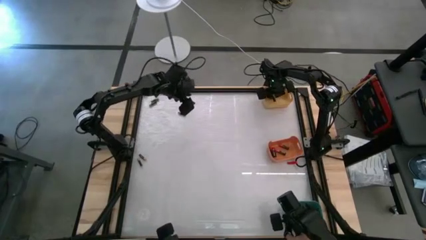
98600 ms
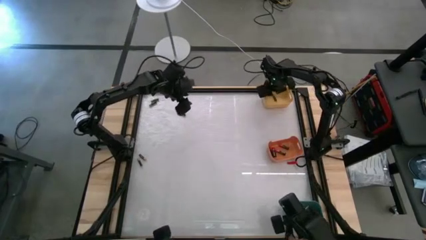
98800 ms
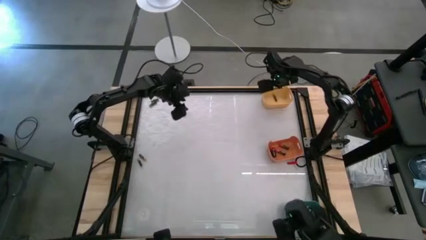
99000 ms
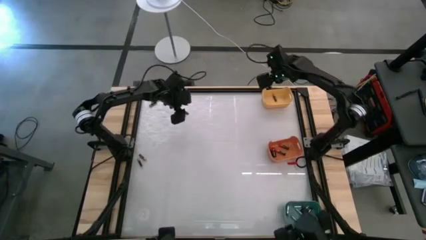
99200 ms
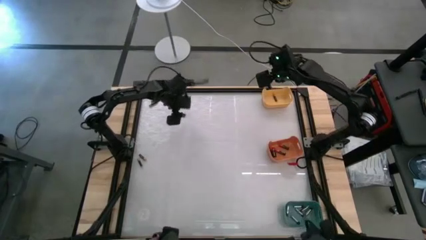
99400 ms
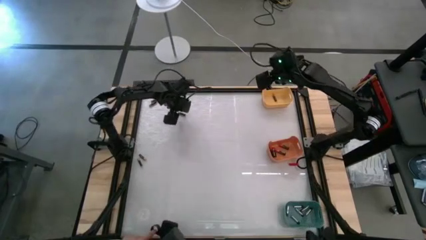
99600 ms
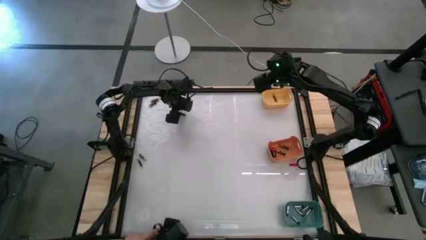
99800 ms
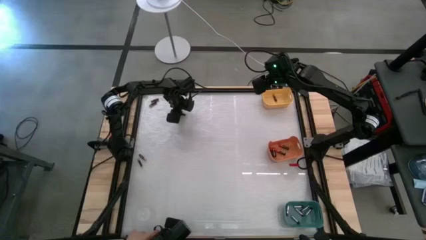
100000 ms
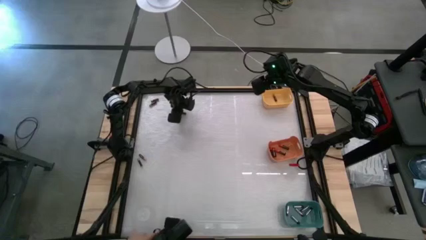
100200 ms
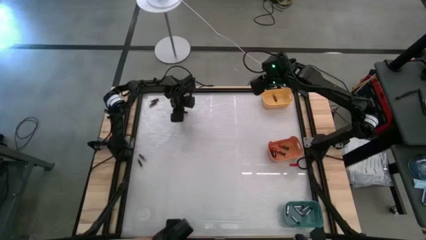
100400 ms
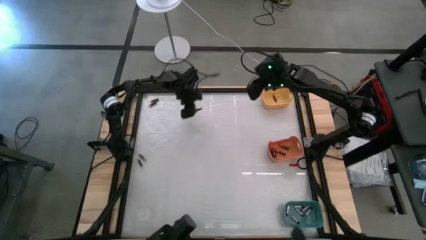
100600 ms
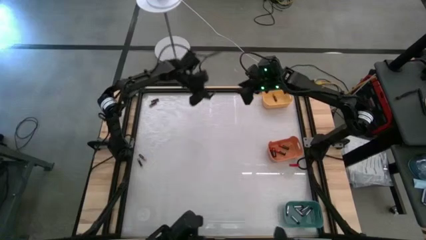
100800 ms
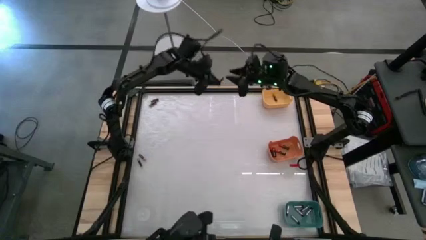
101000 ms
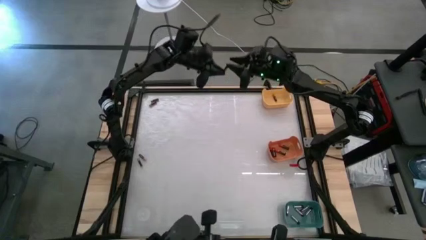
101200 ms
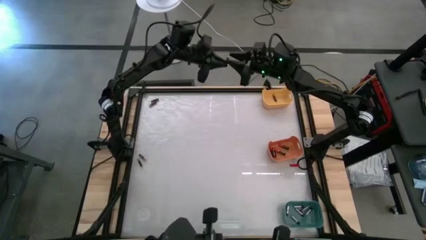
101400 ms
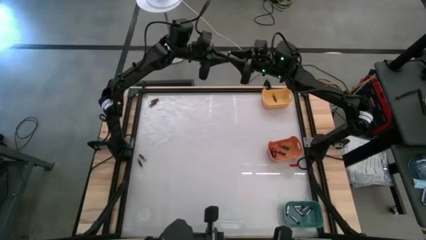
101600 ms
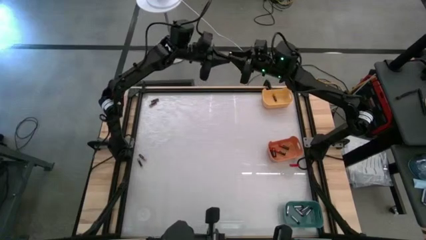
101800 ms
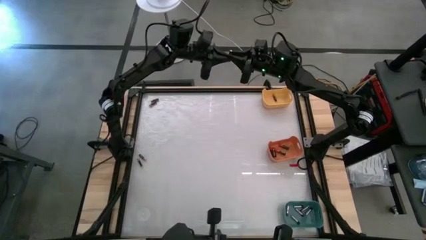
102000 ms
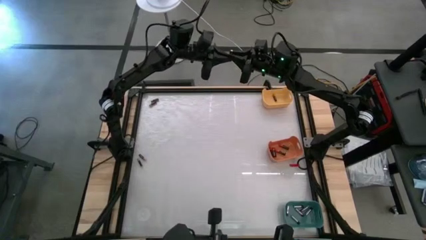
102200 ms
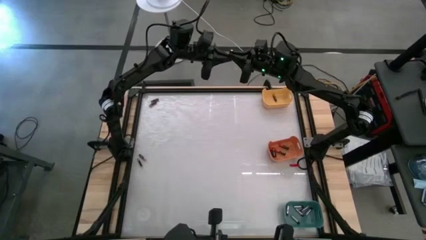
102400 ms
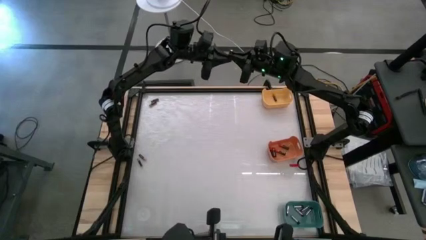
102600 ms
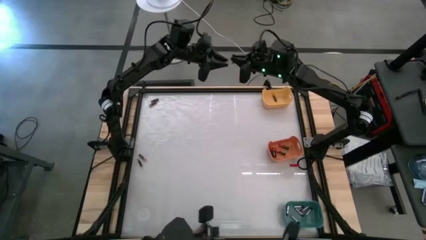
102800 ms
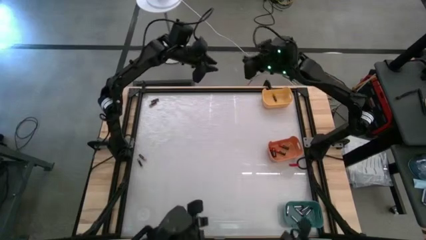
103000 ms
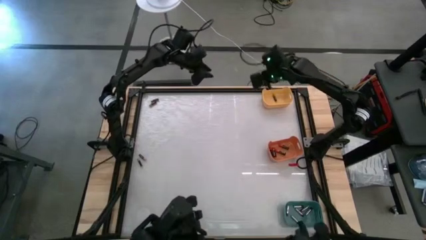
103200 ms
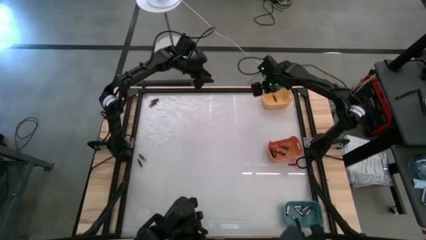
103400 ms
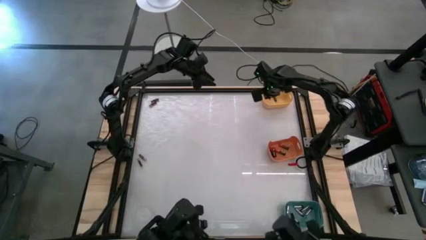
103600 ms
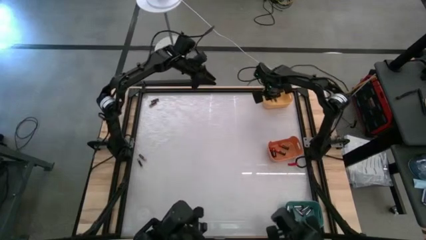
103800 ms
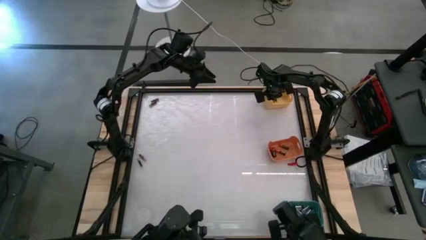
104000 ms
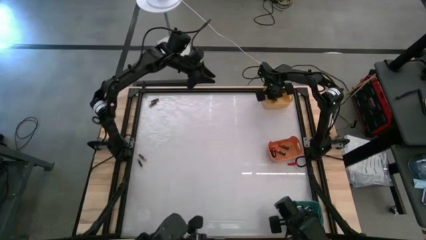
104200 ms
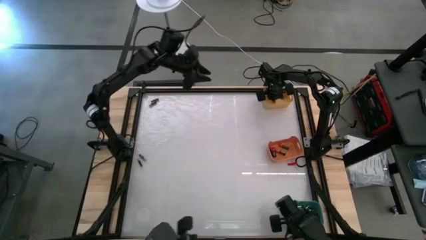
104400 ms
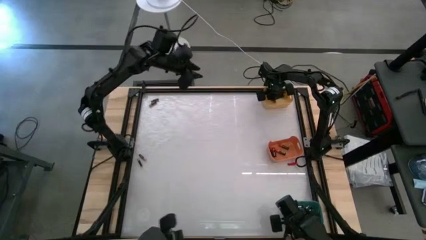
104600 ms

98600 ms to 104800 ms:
Task: Sort batteries
Put the black-orange battery into the yellow bin

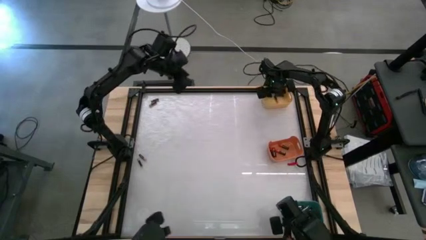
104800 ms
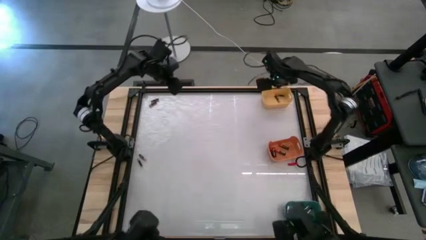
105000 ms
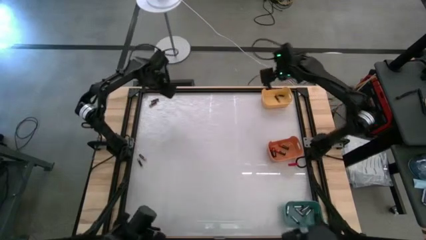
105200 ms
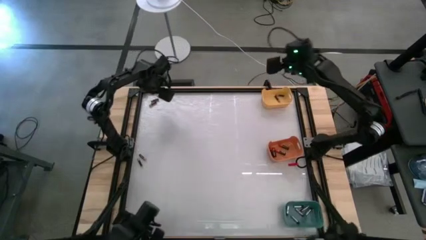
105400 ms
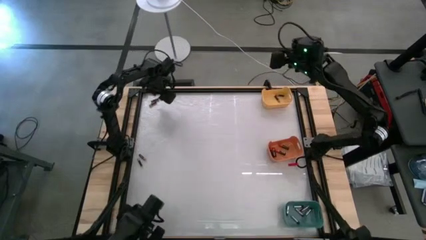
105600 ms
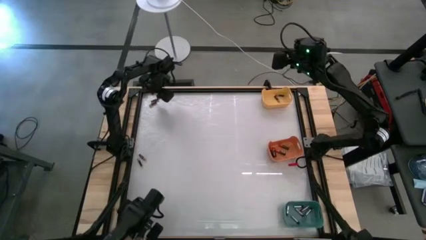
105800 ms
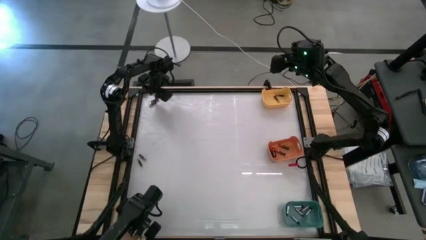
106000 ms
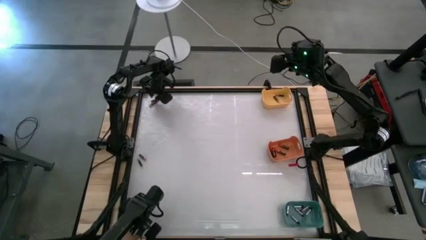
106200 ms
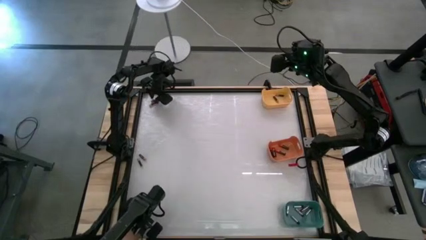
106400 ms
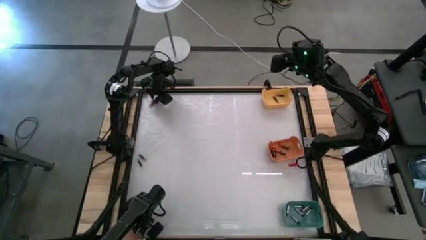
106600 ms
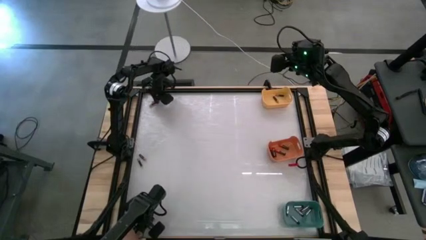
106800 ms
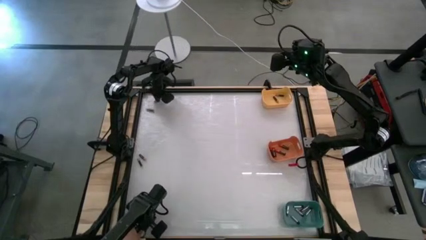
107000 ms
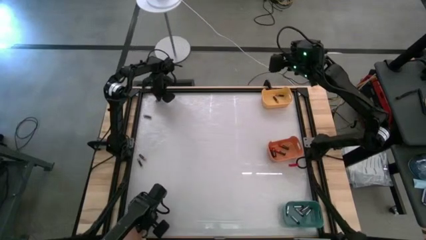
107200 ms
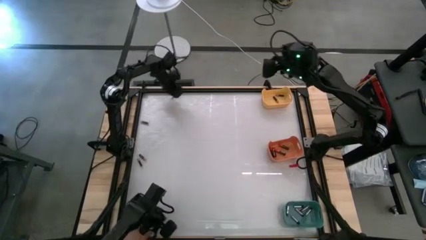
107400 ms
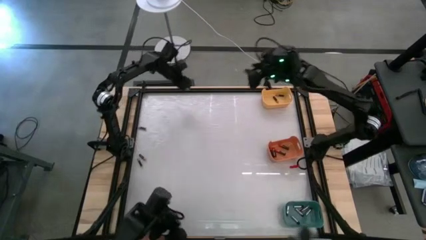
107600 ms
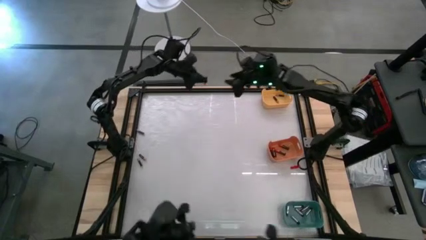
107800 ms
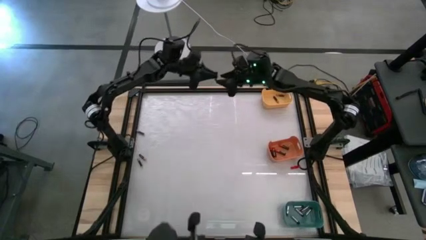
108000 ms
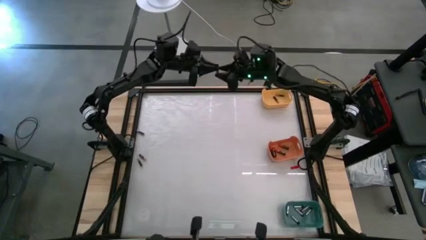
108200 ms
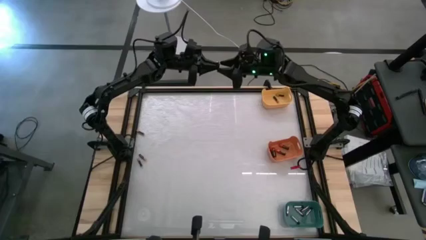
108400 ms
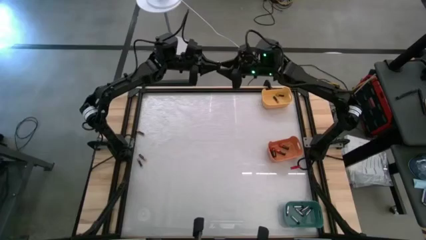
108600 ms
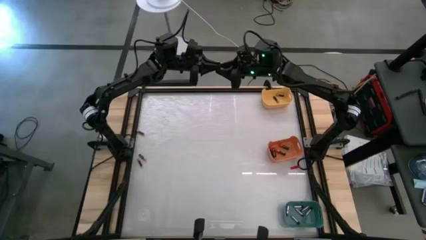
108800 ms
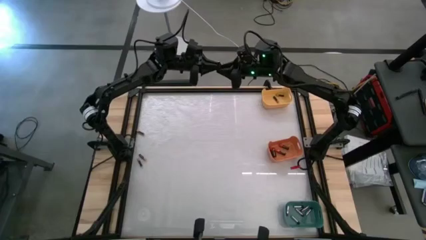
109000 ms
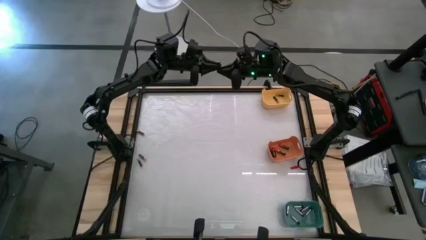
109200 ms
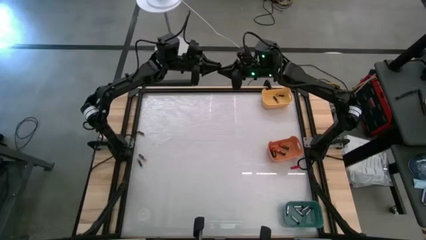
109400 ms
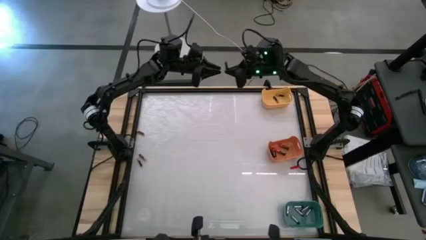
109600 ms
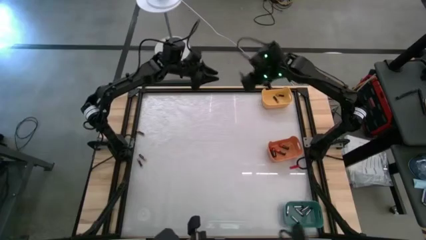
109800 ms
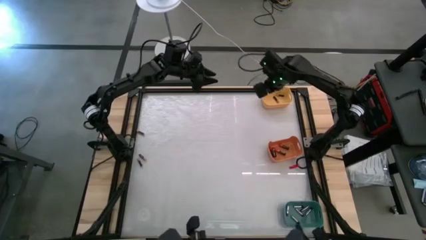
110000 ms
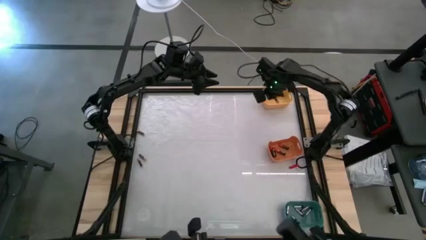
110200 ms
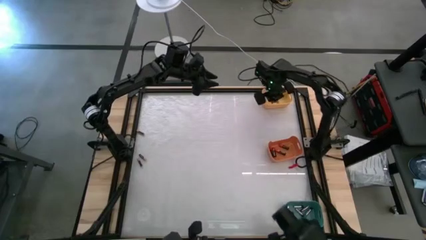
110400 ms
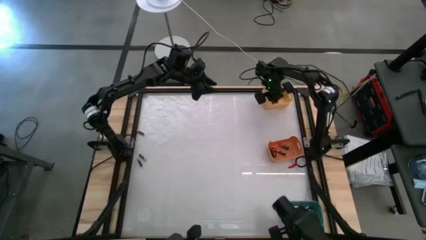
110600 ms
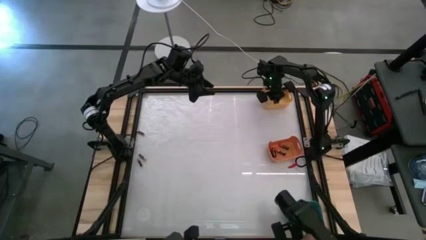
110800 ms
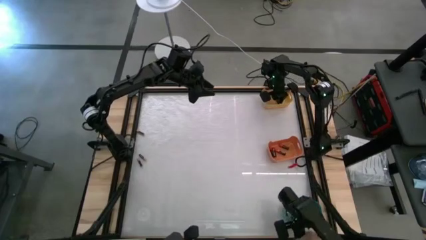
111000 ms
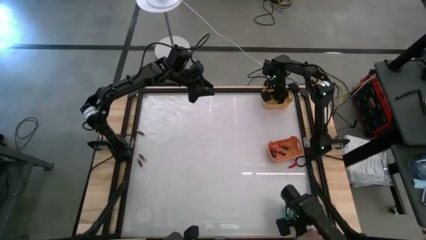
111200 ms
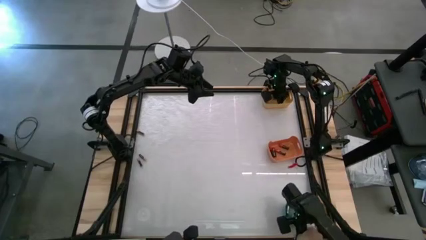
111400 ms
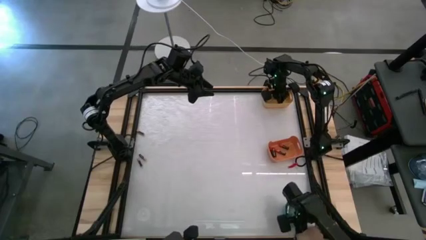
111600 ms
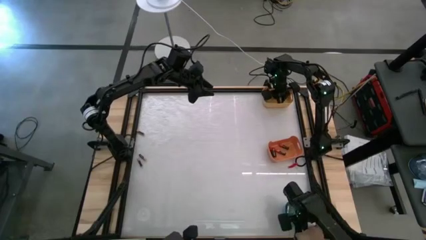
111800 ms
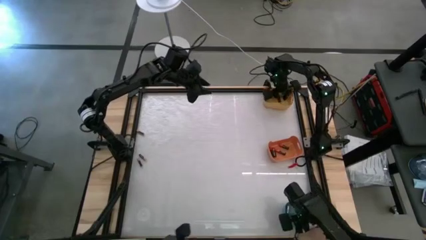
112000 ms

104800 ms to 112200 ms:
Put the black-orange battery into the yellow bin

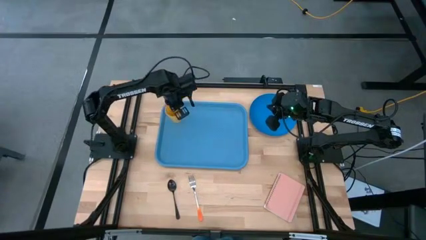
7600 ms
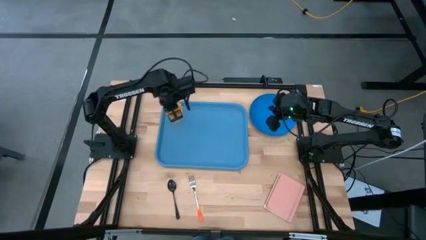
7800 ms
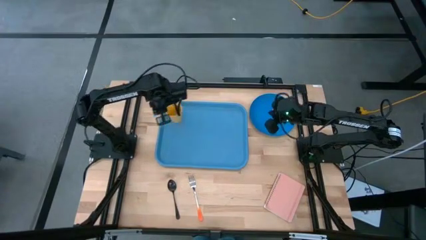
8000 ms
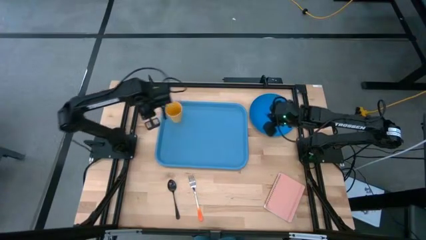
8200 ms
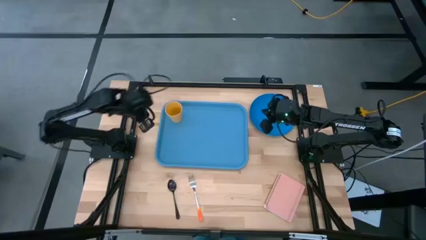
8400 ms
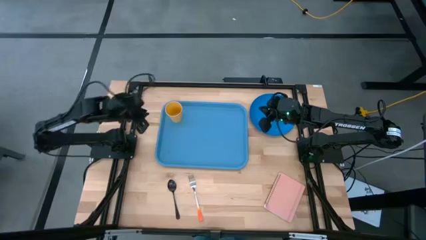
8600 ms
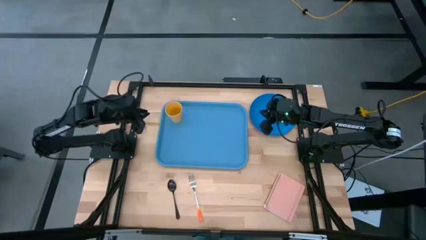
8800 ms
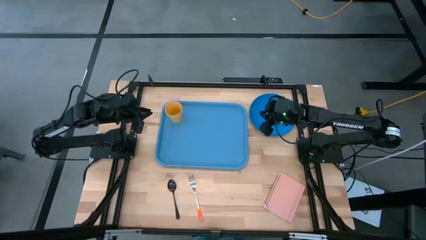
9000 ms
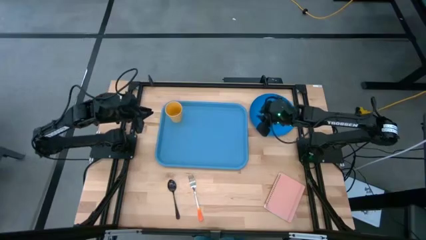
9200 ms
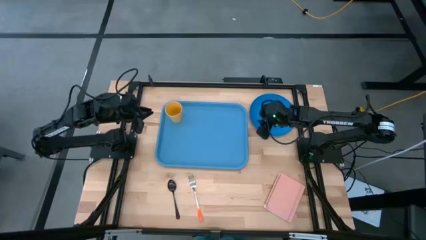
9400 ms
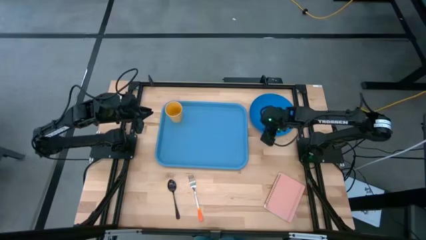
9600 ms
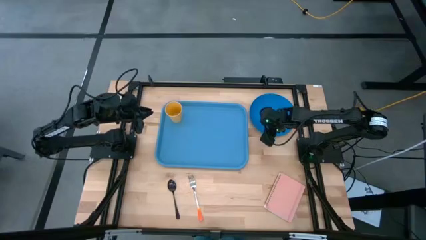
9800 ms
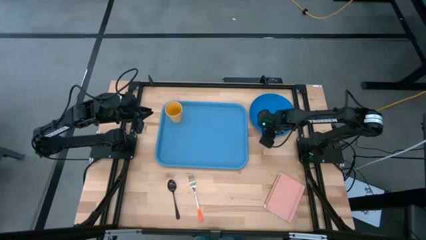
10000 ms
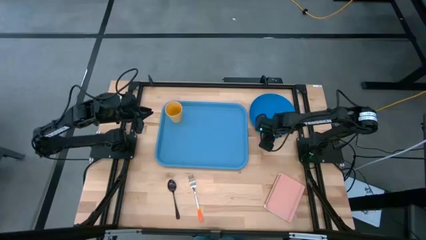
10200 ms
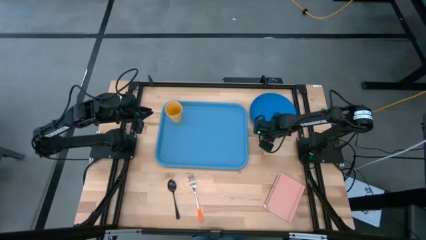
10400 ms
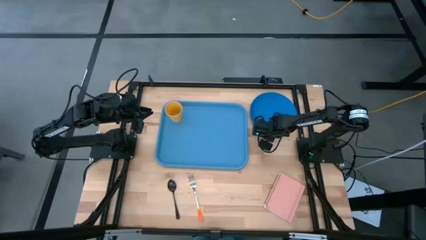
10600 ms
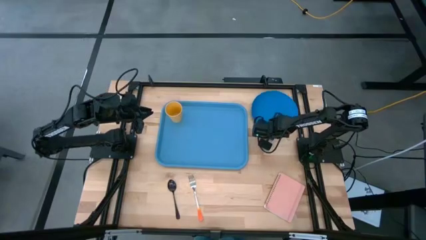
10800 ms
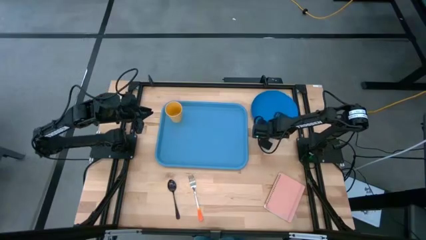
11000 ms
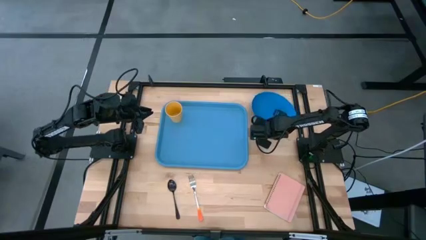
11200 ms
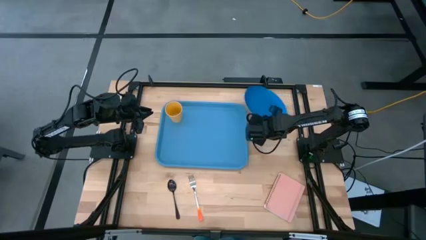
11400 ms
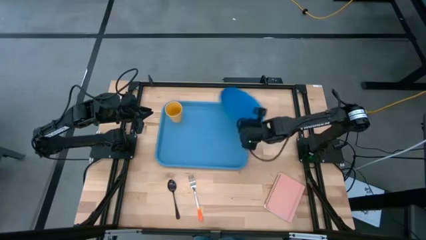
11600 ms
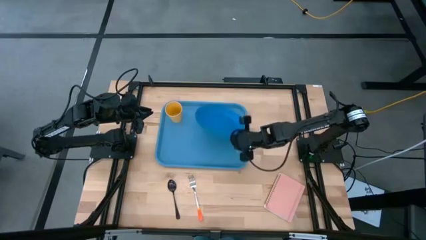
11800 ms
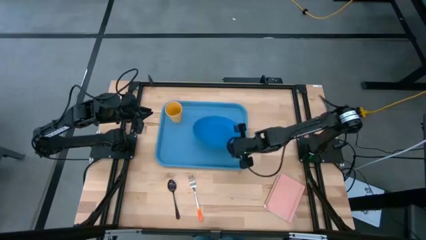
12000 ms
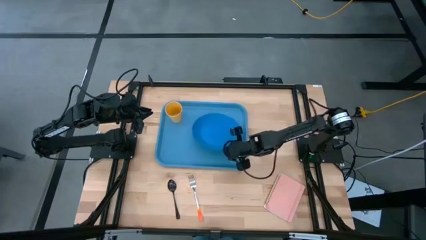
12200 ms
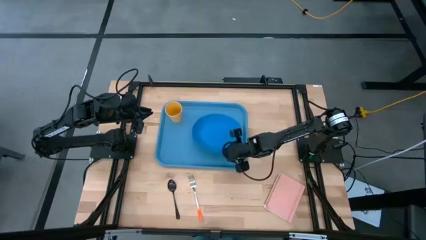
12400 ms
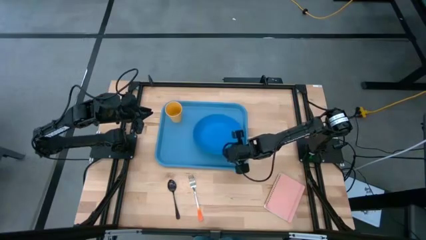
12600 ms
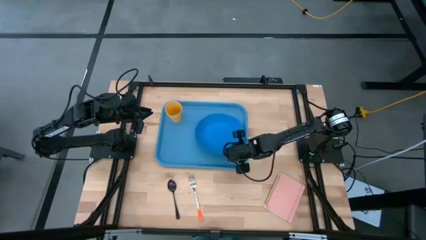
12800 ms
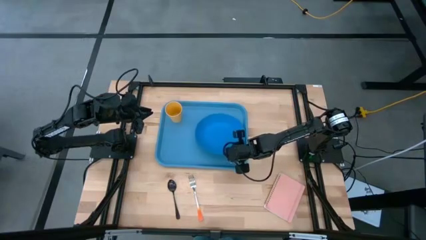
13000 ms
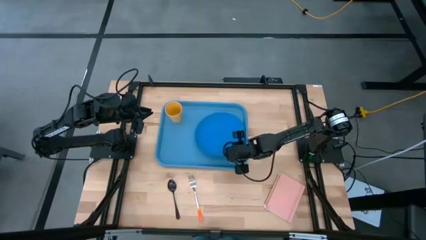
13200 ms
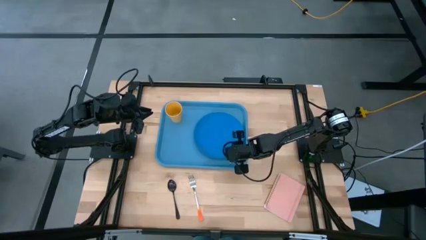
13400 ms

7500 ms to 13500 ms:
Task: Pick and place plate/cup/fork/spoon on tray
Put the blue plate on the light blue tray to the right side of the yellow cup
